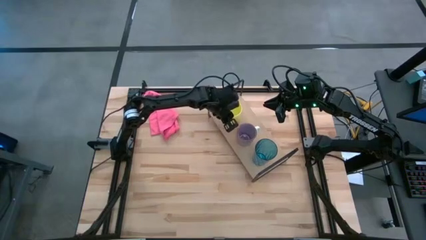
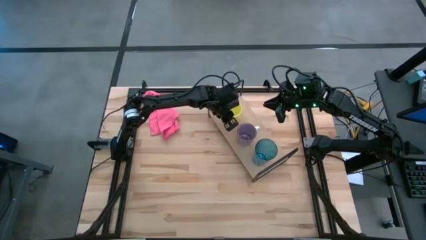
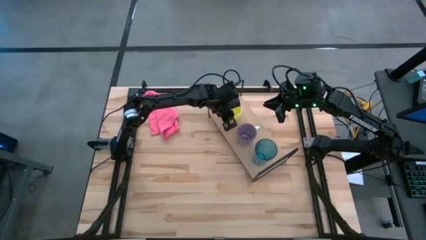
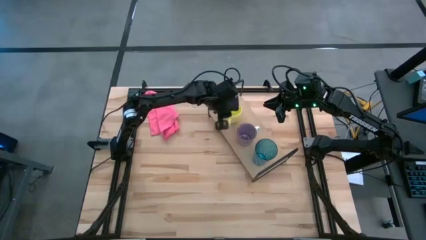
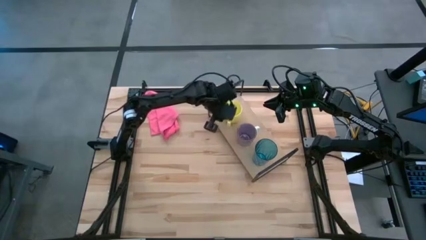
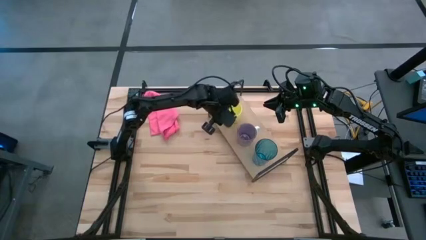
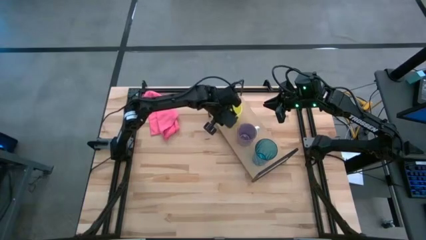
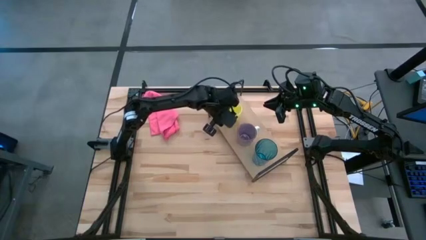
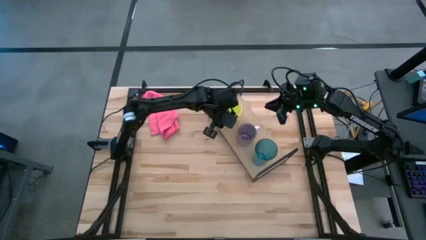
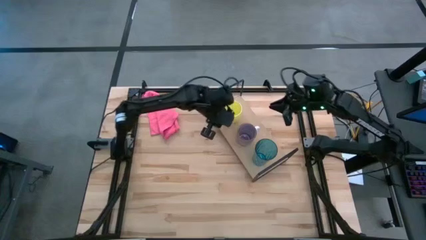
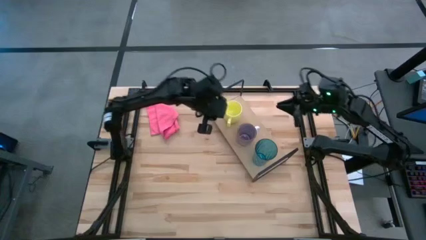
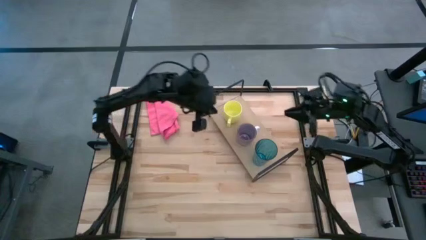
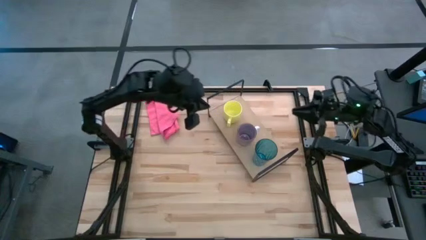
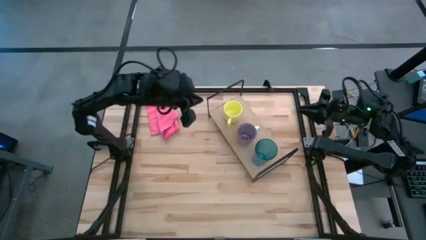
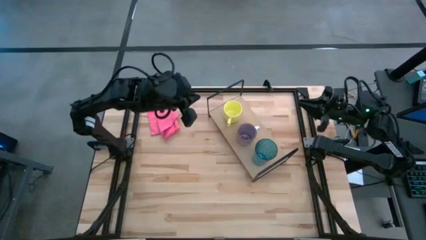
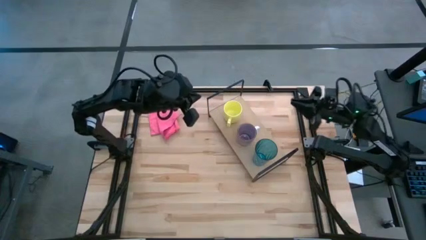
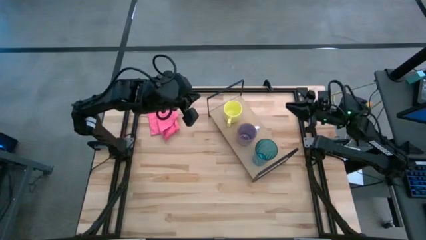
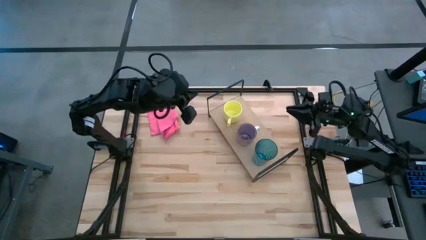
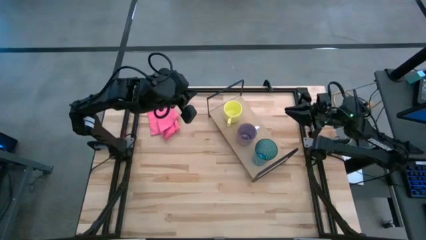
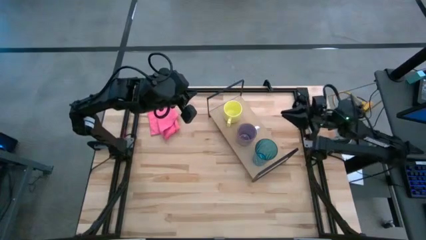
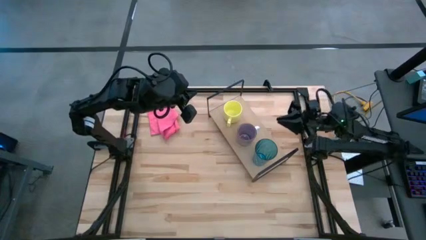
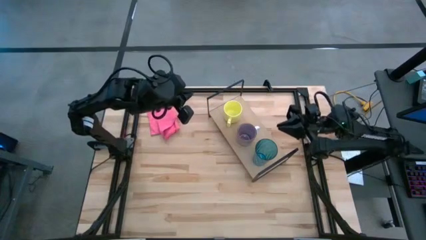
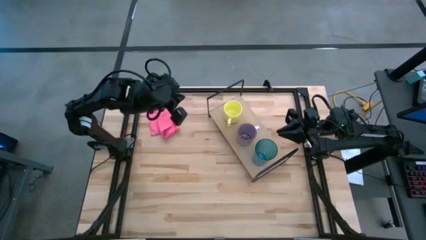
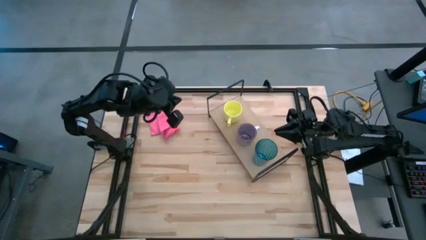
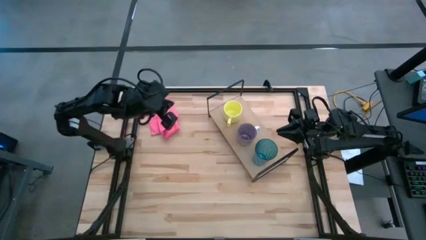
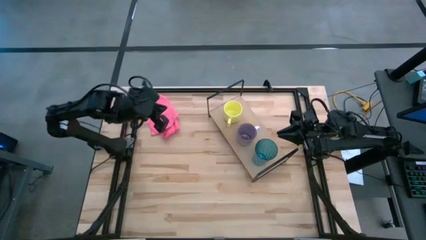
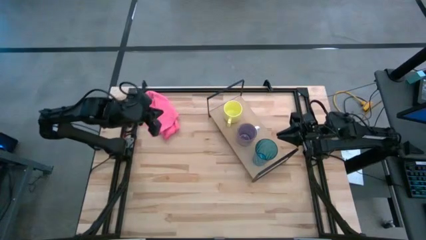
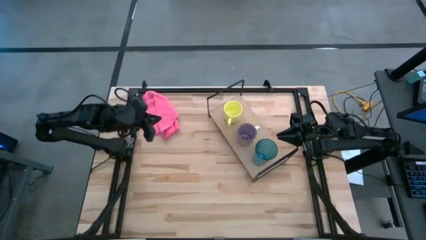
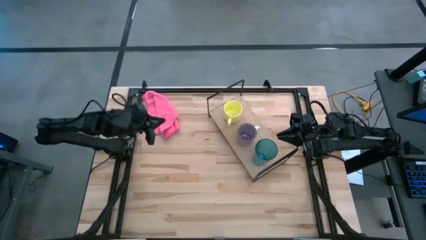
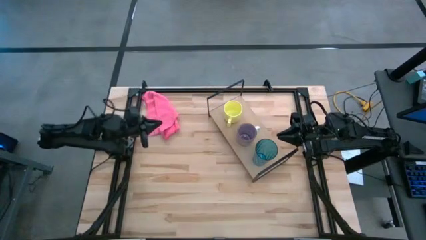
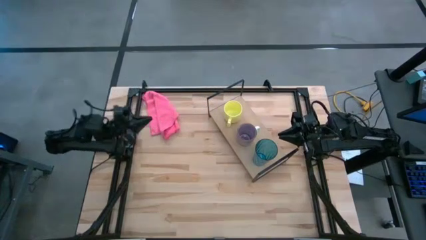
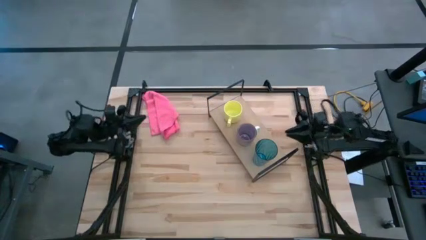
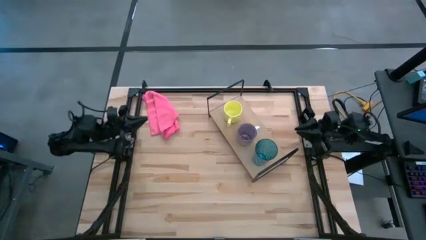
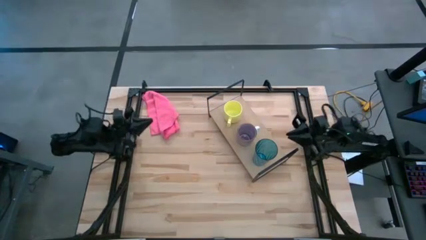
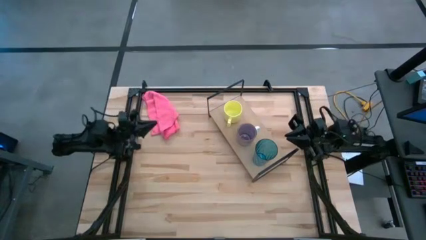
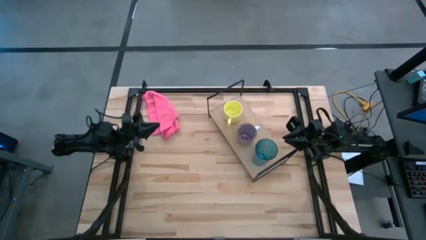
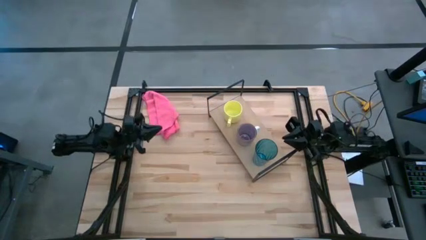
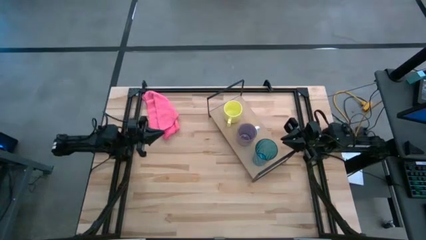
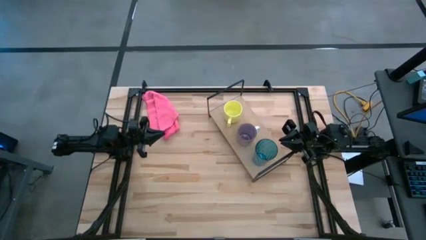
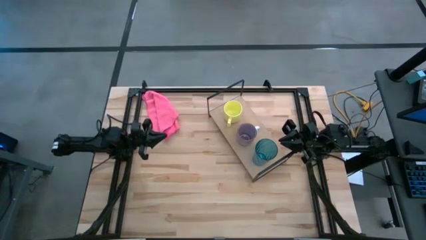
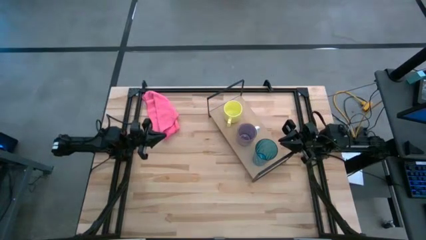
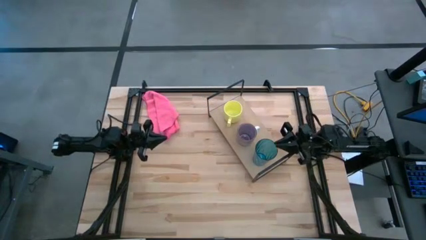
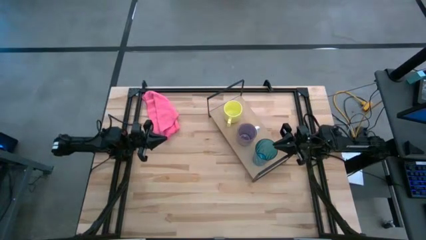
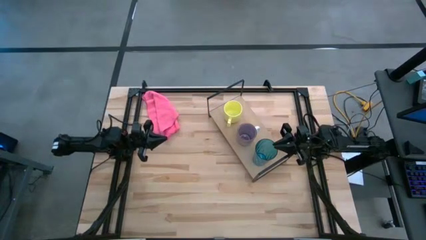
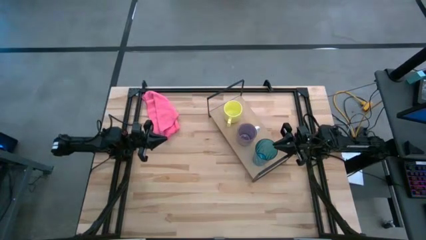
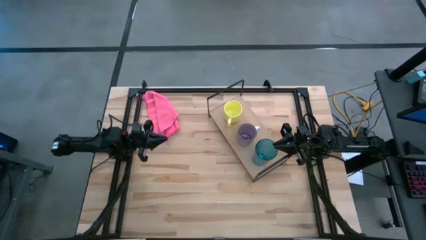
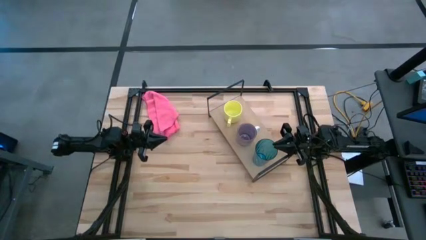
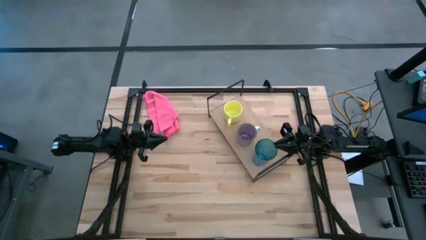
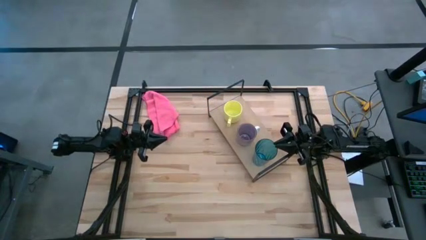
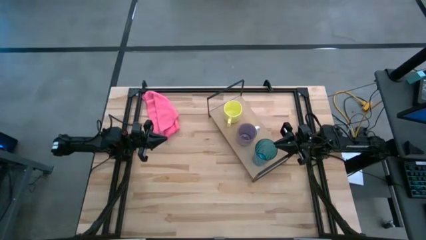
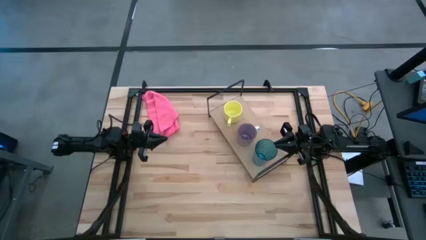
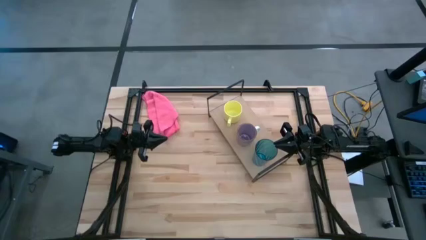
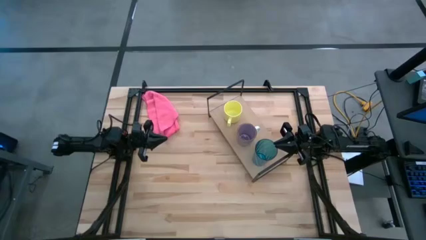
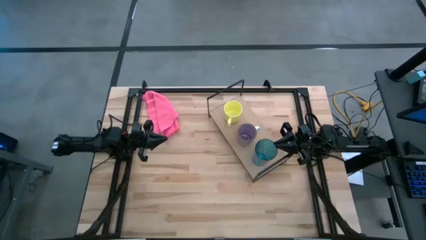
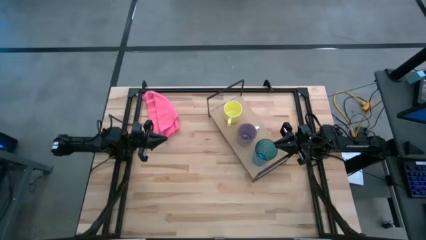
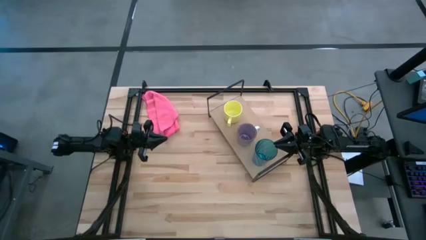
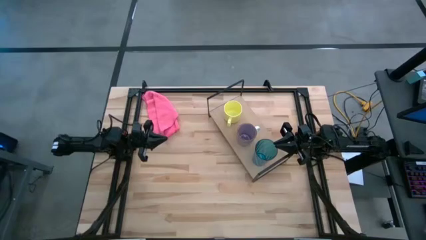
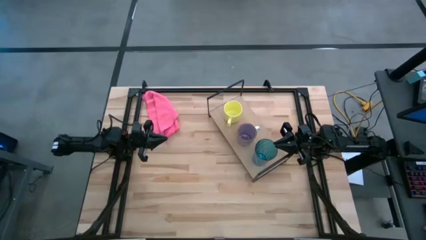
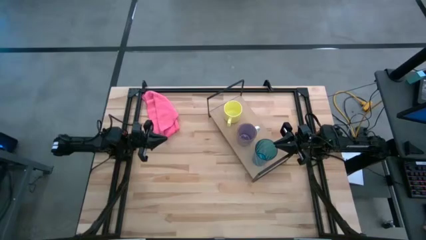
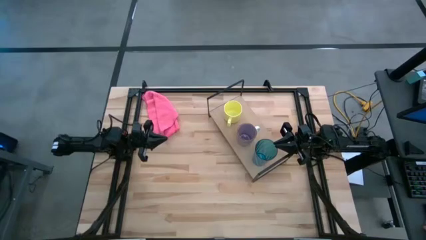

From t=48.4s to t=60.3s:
Task: Stack small to large cups/mugs on shelf
Return to Home Position
